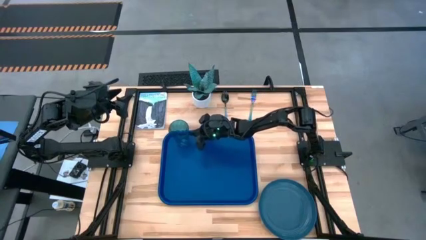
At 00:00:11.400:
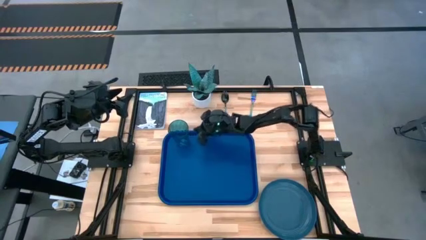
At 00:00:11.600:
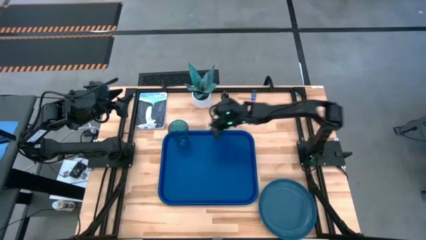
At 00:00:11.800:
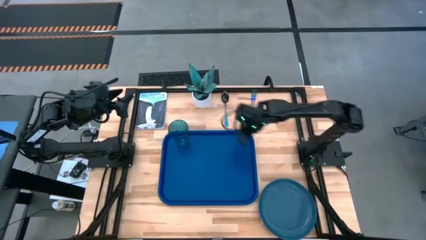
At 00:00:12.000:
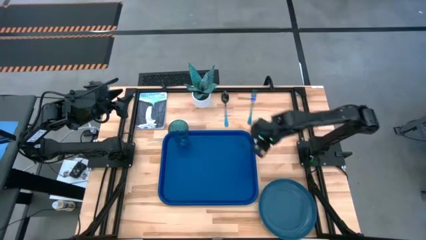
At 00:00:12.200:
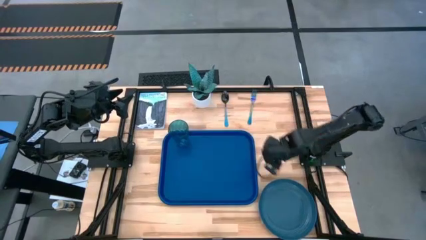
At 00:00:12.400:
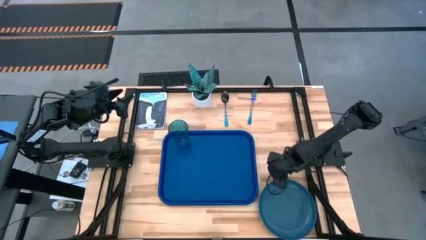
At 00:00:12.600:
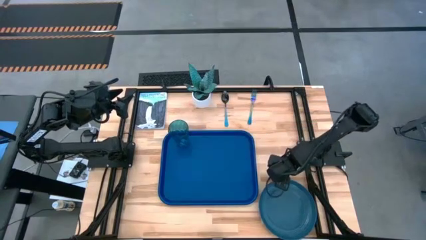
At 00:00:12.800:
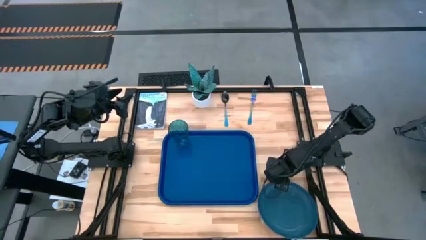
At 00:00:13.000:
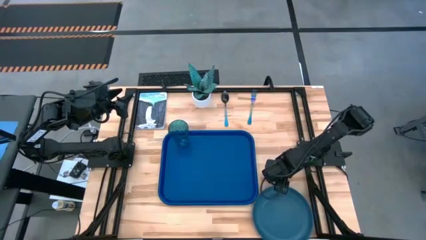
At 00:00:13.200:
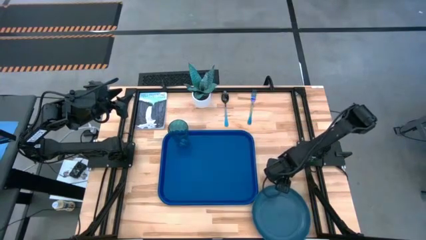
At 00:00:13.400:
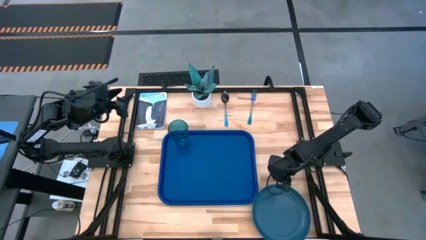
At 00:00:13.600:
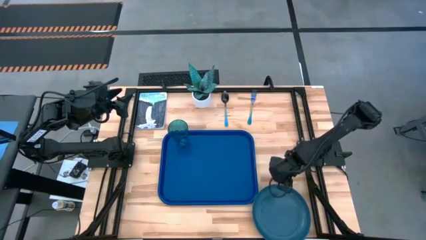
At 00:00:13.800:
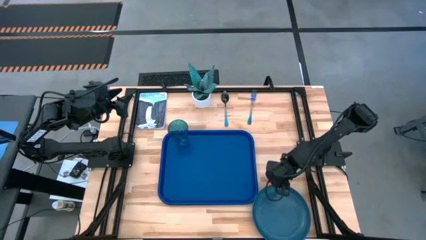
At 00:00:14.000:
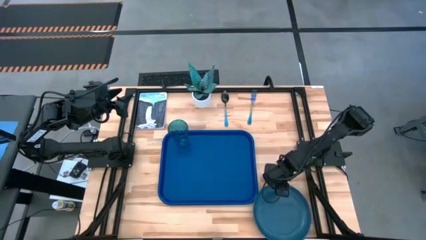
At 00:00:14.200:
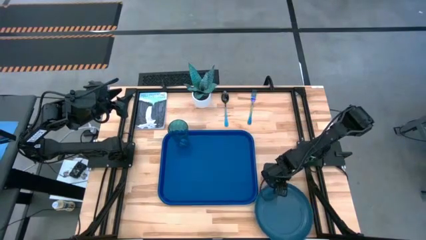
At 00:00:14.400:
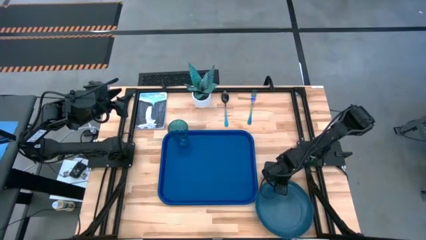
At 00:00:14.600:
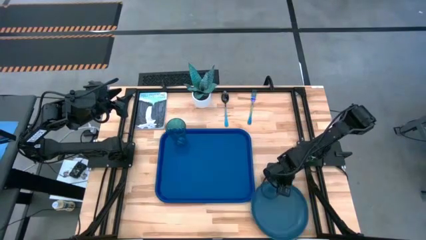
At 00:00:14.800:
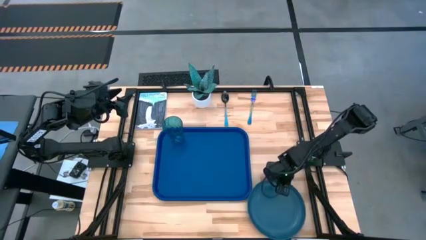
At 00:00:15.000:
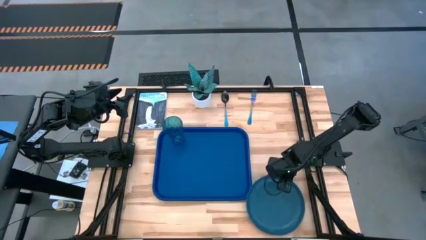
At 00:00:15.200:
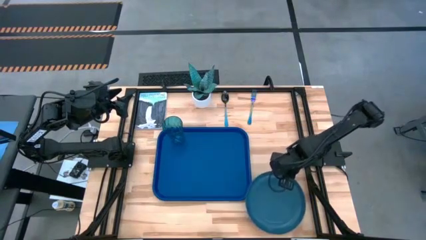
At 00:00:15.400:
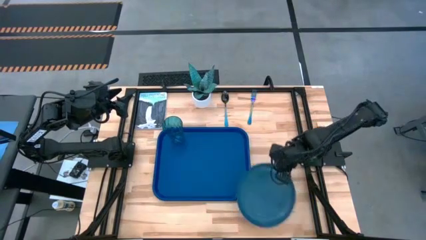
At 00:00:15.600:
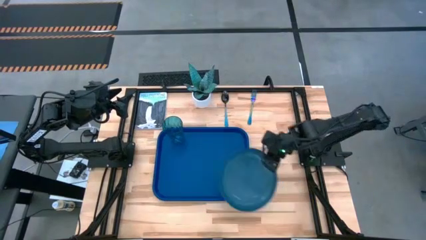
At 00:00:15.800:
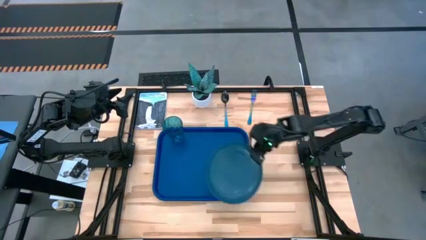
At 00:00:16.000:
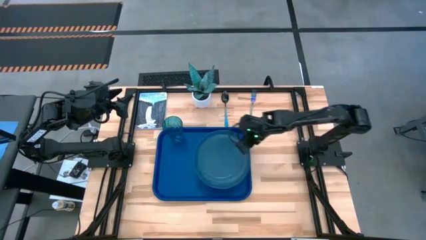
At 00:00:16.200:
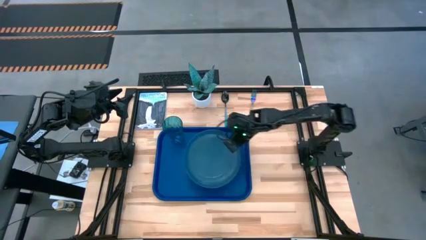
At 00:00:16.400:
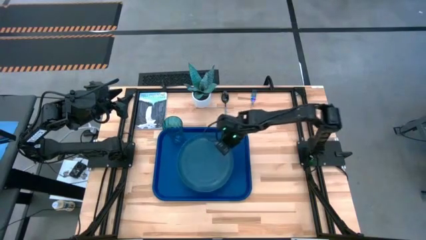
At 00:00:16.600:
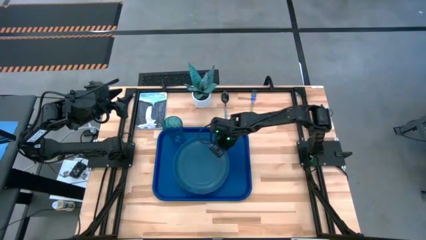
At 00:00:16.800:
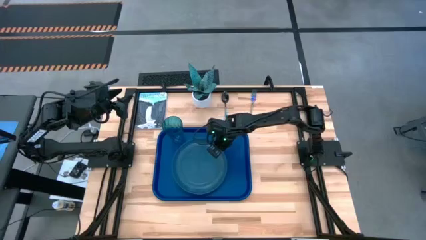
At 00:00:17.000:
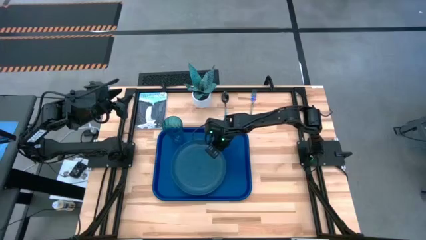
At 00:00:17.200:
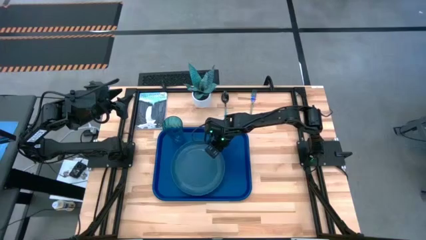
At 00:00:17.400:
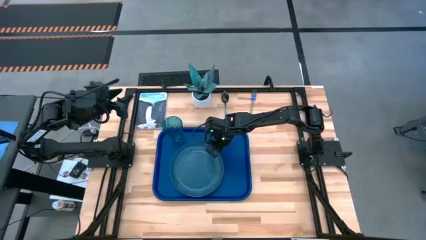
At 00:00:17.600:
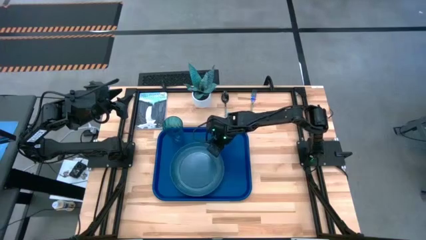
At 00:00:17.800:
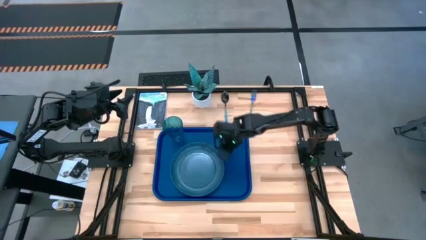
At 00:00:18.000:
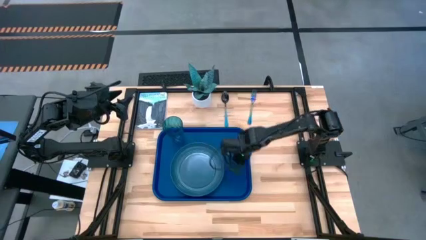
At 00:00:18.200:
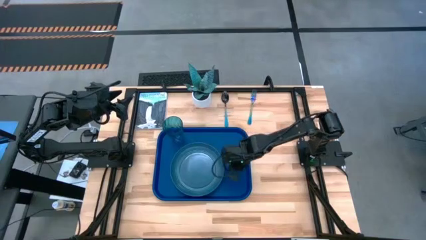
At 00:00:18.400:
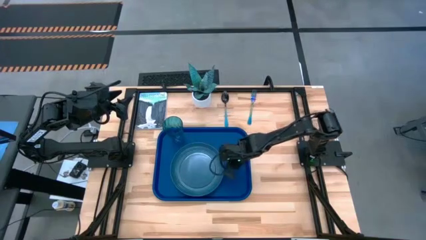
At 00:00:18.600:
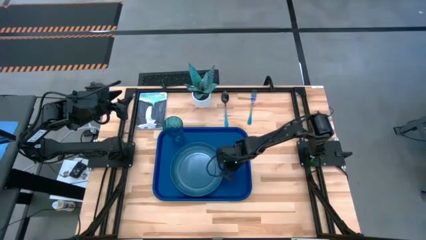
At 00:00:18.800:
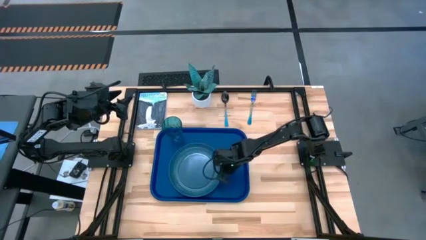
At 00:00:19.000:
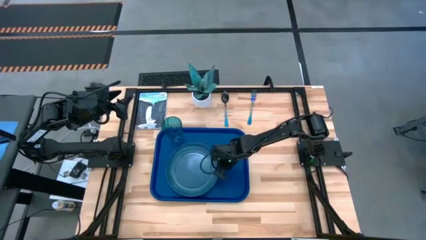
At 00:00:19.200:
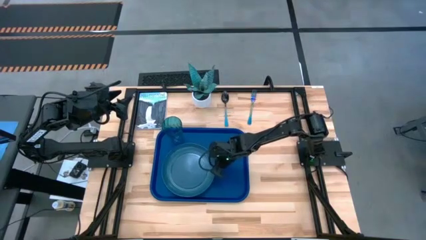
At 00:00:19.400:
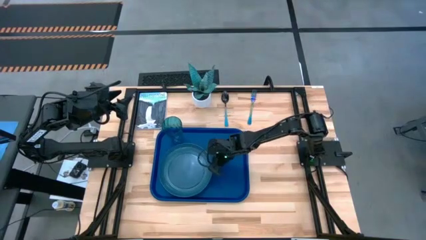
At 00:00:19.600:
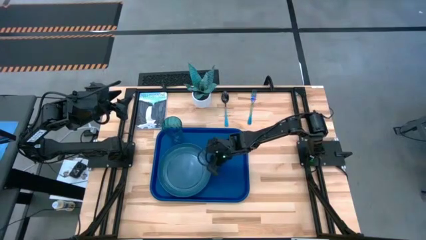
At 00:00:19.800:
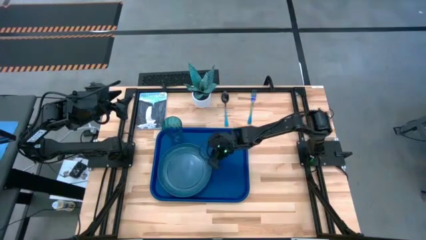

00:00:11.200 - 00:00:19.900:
Task: Pick and place plate/cup/fork/spoon on tray
Put the blue plate on the blue tray on the bottom of the blue glass

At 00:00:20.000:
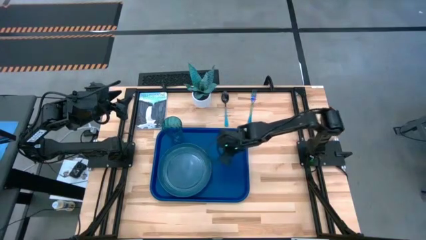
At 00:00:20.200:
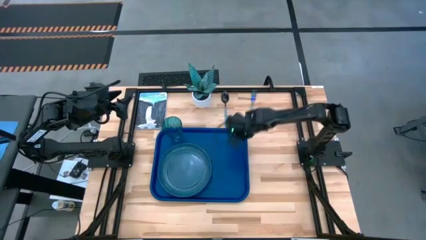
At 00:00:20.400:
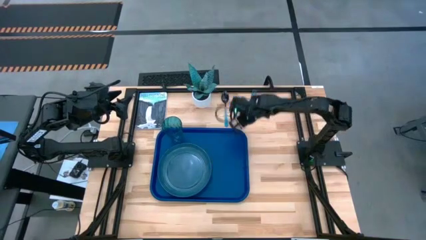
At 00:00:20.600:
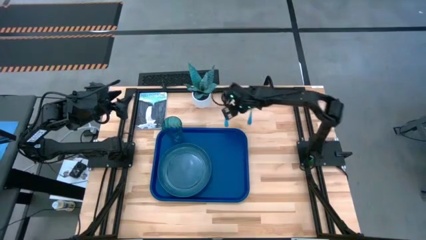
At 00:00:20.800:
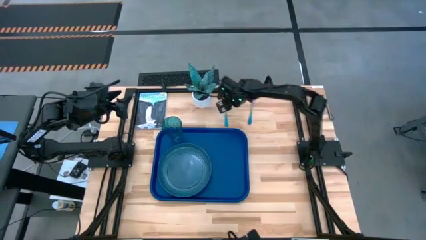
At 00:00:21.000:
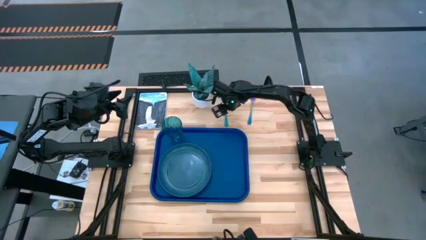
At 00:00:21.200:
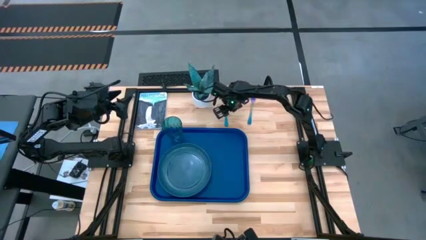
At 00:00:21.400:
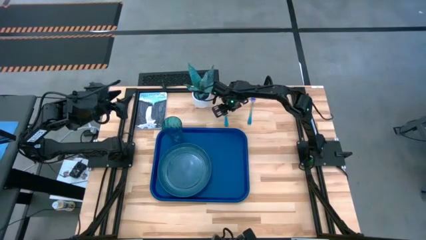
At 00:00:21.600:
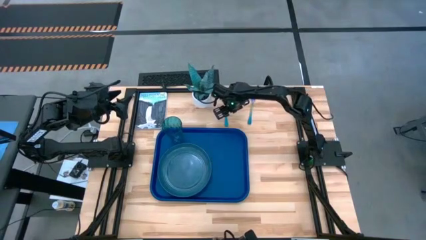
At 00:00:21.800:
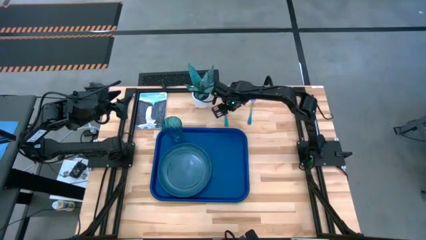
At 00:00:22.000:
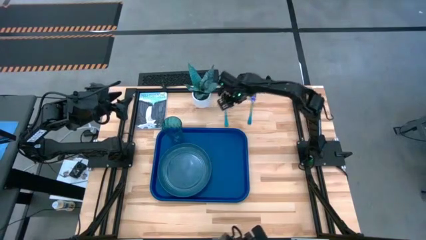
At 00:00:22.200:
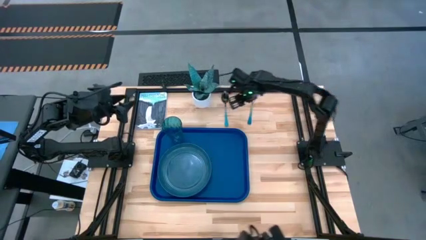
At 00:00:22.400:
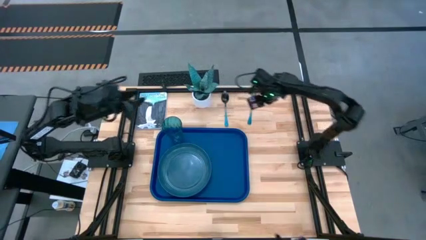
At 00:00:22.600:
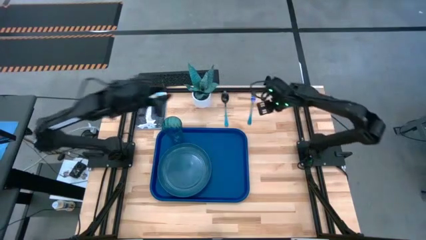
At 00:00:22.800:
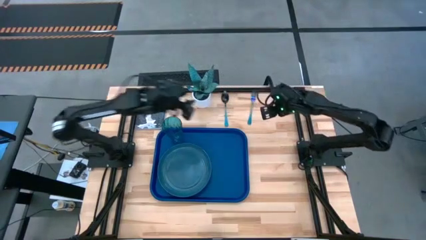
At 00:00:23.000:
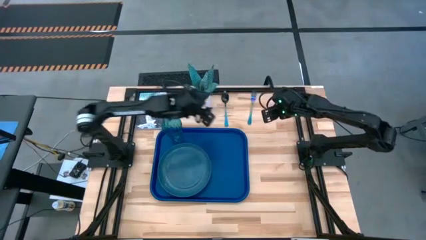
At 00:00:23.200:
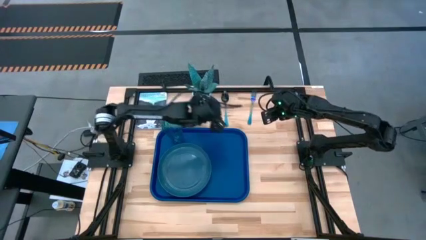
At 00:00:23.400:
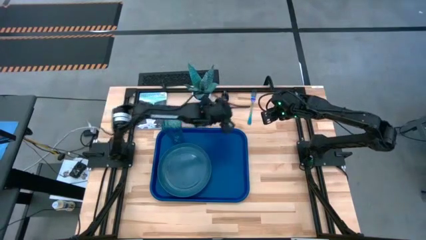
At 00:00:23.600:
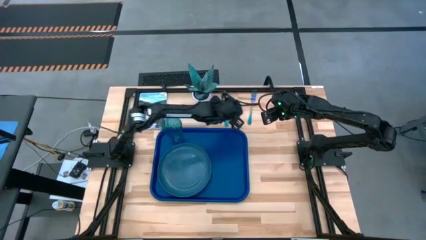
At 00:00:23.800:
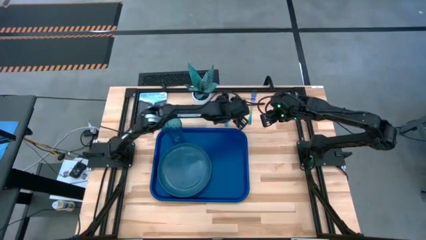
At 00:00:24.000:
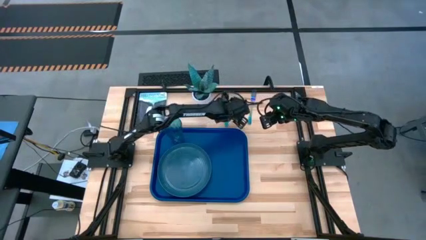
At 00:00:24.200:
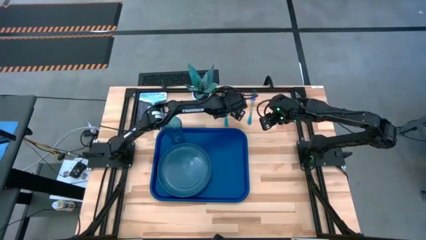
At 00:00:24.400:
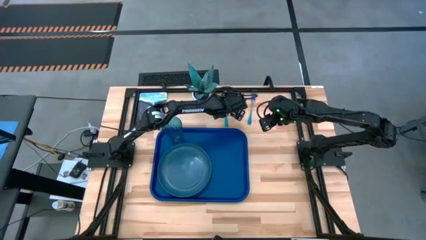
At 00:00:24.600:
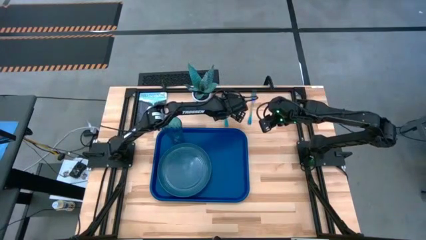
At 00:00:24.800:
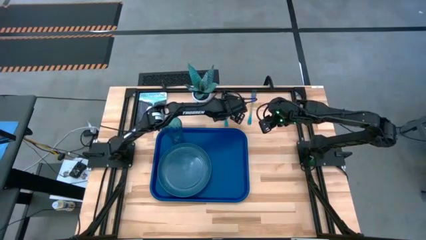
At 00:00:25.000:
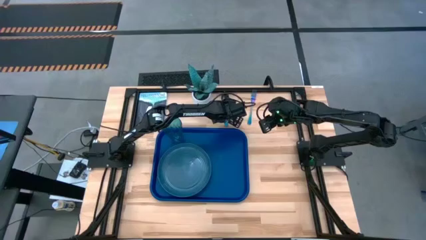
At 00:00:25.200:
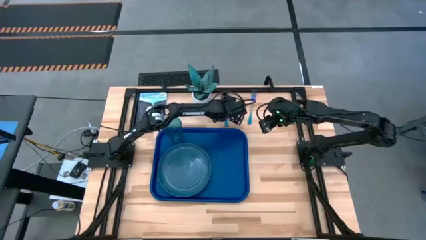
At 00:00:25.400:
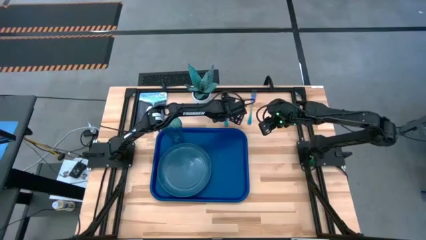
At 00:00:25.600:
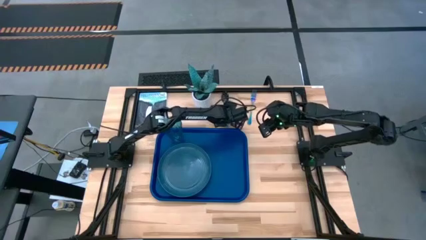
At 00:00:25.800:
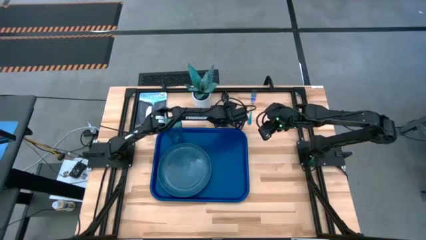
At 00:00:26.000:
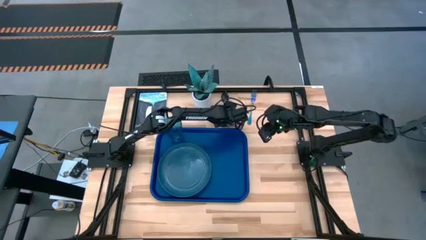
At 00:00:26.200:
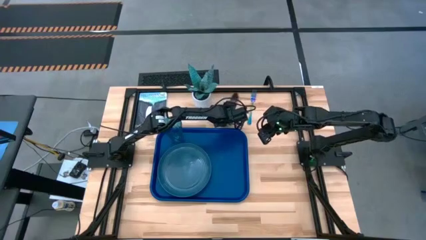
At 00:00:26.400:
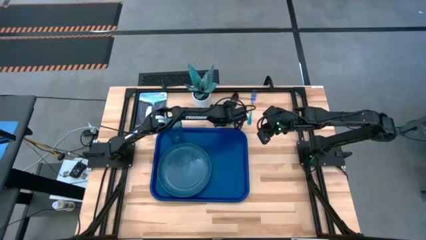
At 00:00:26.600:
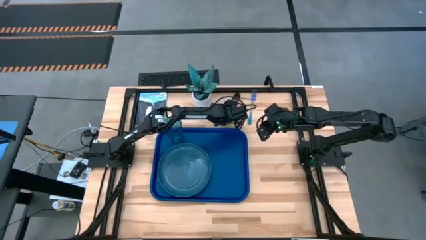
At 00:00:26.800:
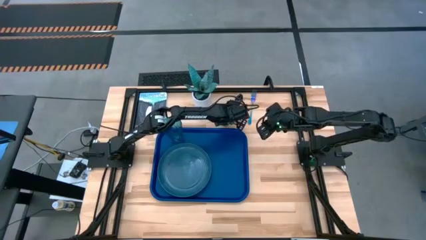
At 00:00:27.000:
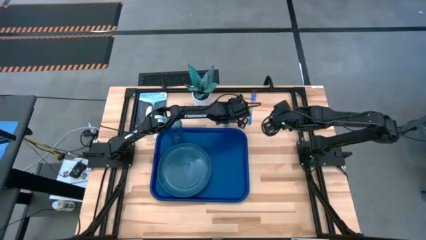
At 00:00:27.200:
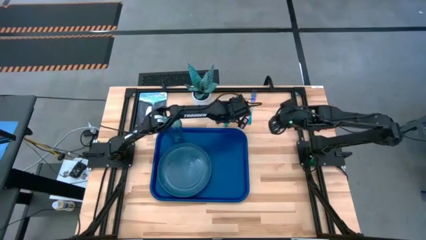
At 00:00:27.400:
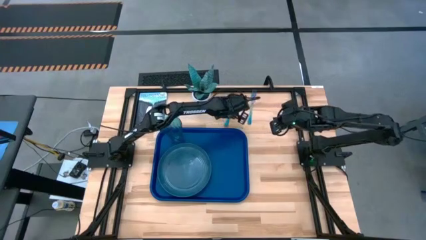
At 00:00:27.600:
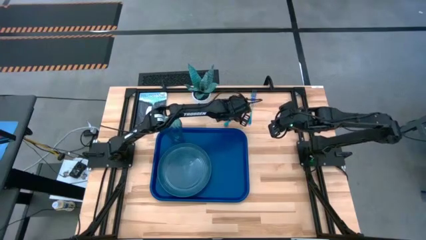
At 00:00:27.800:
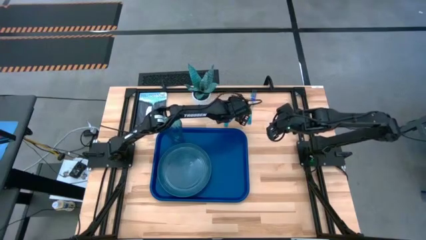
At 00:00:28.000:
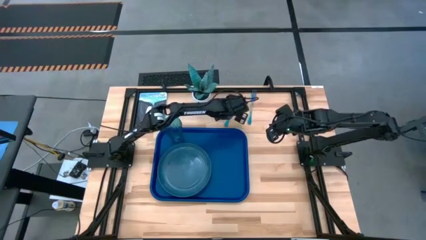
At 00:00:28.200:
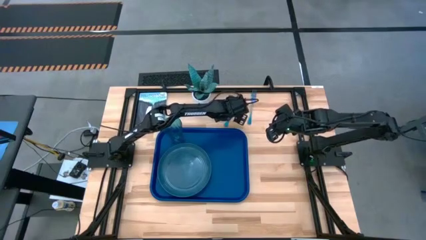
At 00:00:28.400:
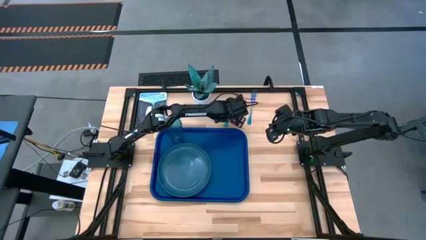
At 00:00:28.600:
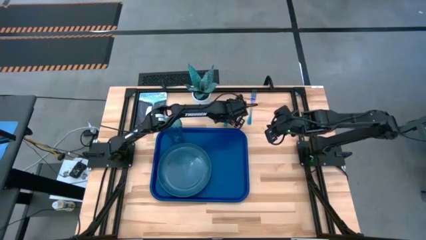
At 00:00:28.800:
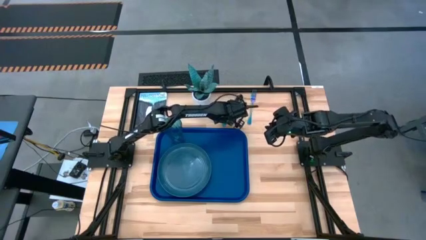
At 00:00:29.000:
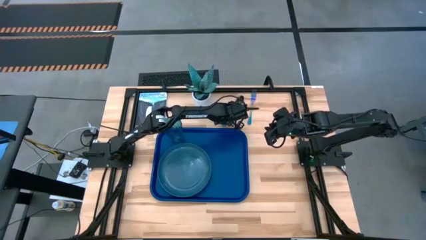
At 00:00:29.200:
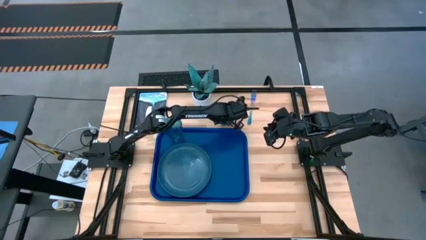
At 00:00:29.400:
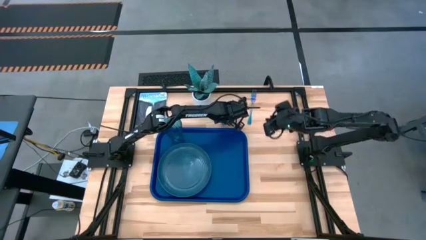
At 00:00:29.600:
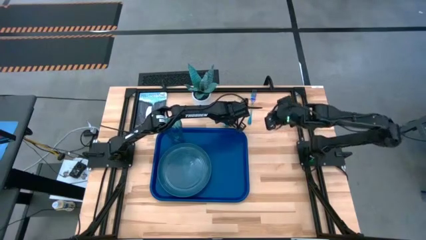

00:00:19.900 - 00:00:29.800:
Put the blue spoon on the blue tray on the right of the plate
